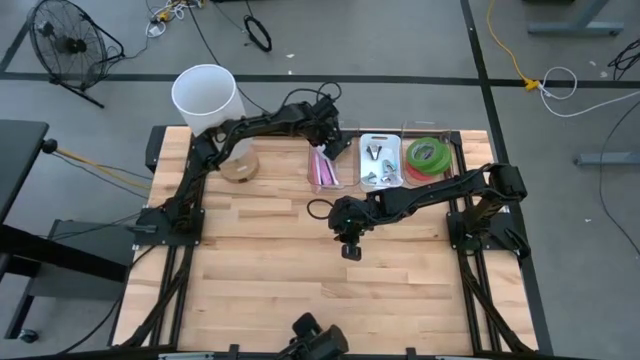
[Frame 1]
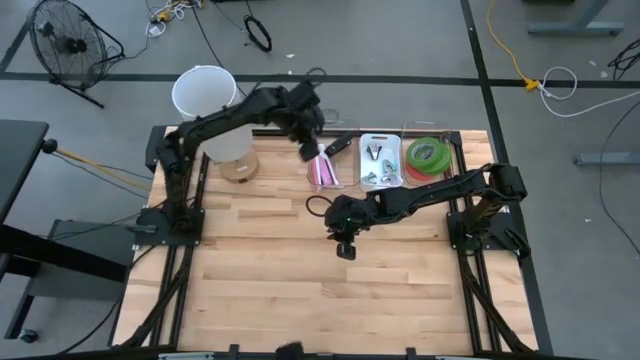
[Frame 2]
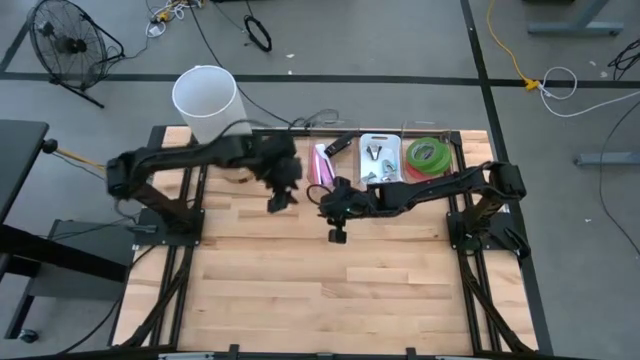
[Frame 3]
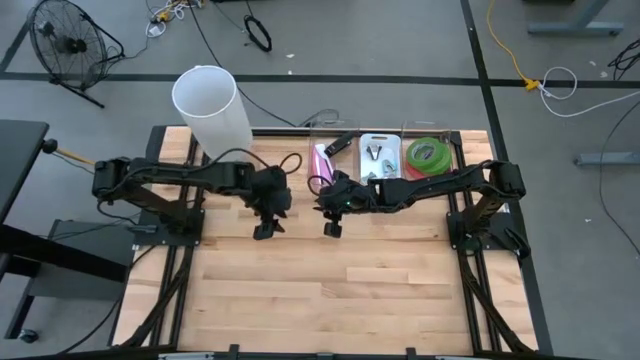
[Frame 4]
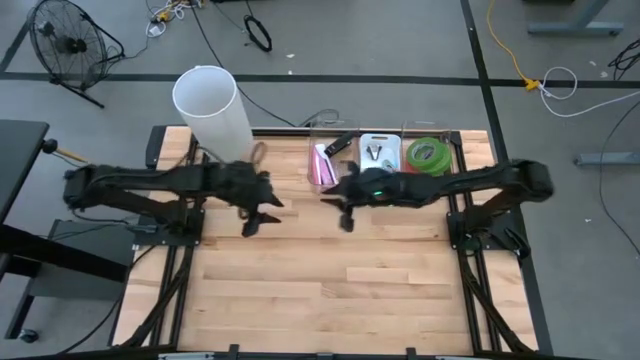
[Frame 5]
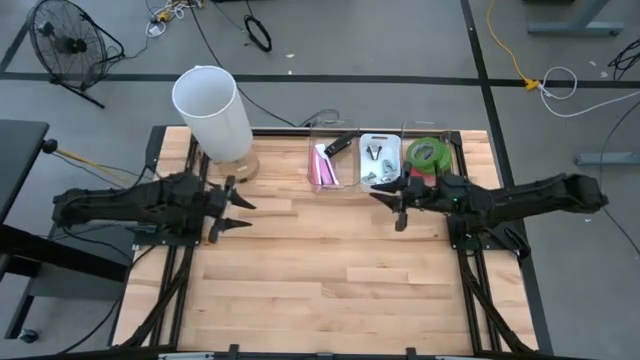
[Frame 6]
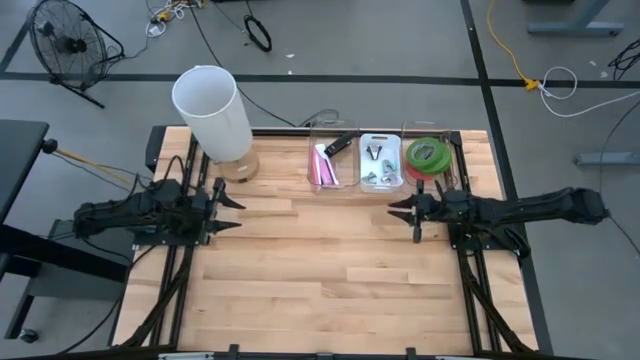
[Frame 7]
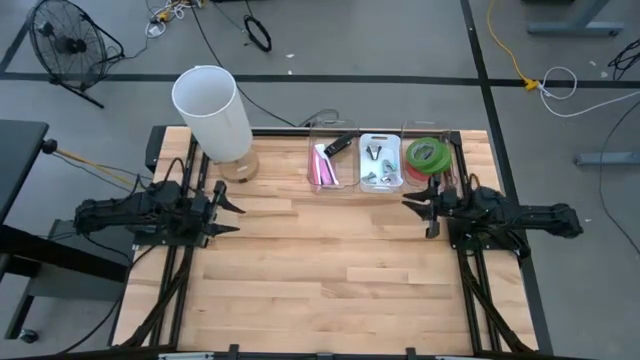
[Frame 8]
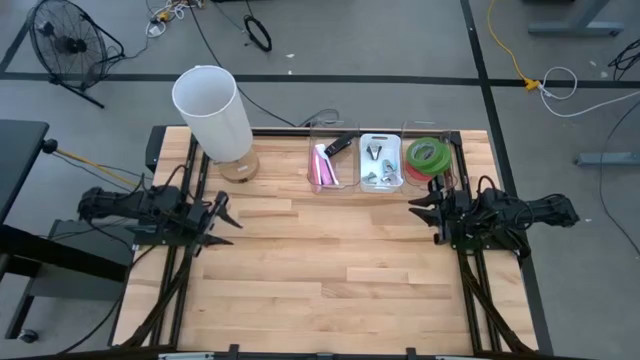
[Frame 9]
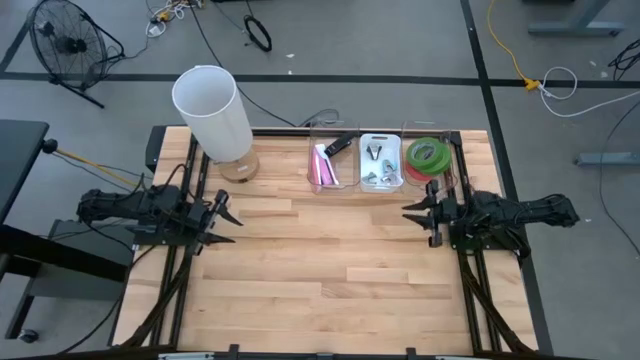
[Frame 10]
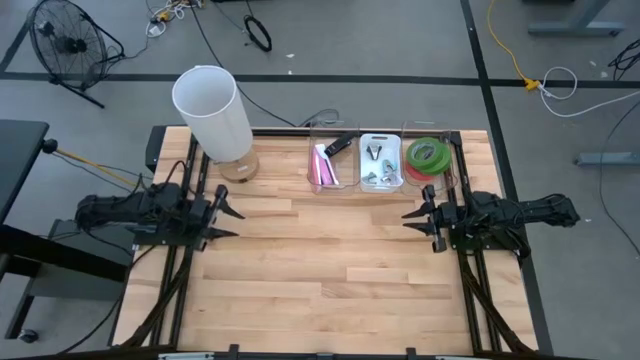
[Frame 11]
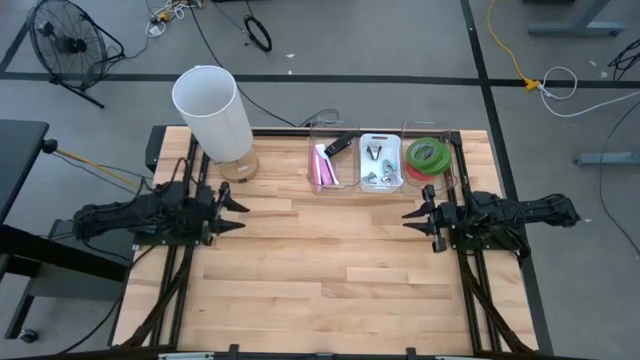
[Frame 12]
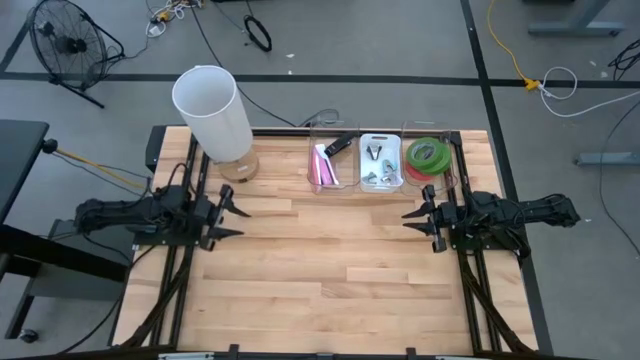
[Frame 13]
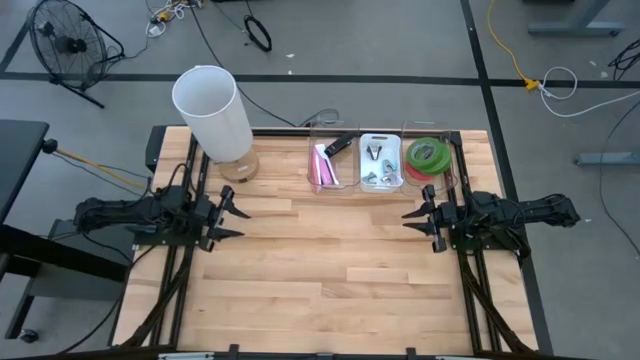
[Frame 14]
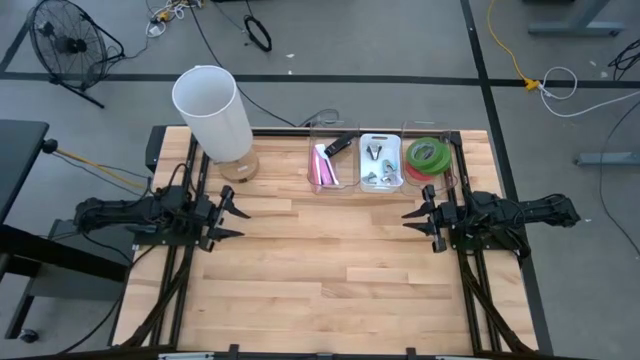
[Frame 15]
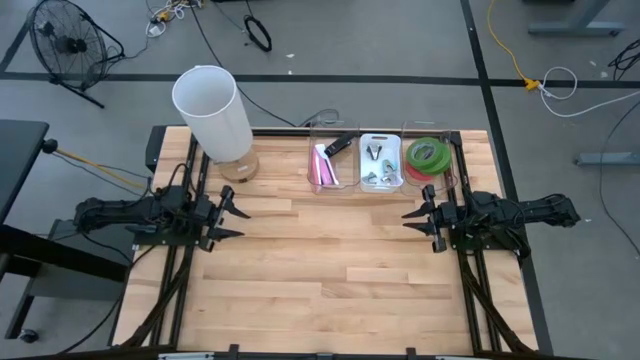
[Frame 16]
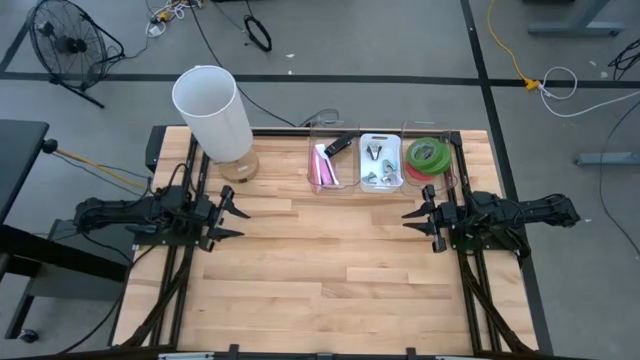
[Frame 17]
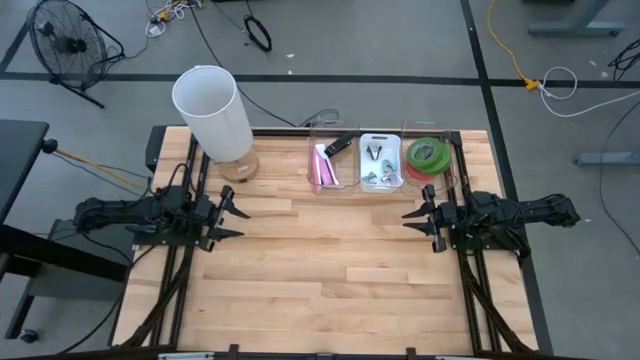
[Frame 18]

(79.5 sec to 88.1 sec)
Task: Pick and place Stapler, Stapler remover, tape
Return to Home Position

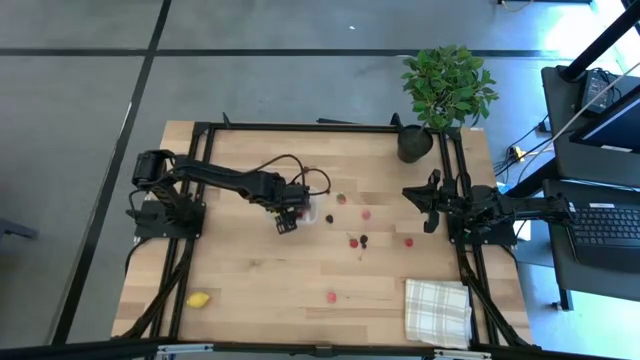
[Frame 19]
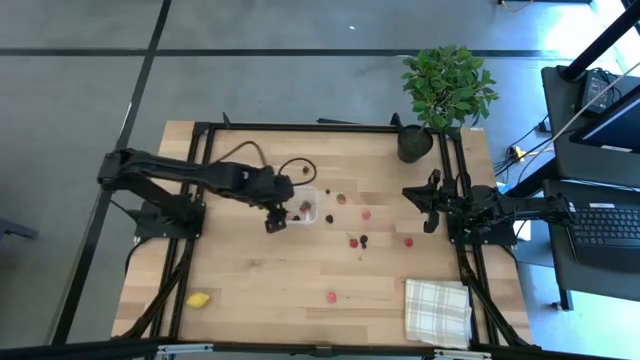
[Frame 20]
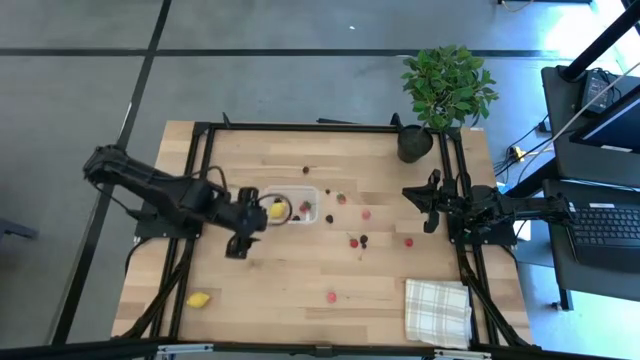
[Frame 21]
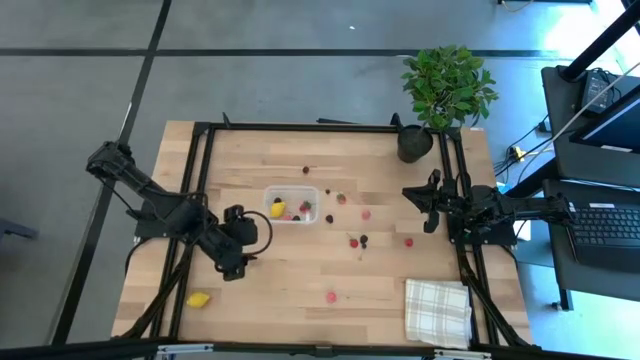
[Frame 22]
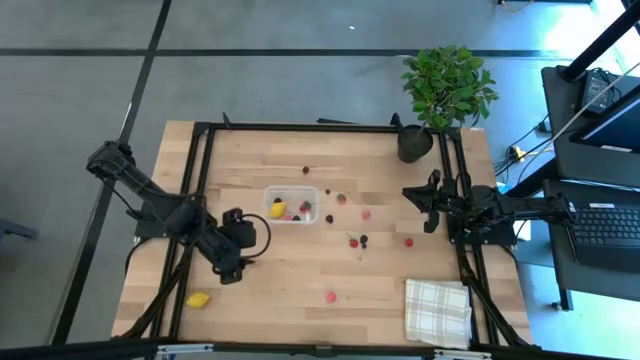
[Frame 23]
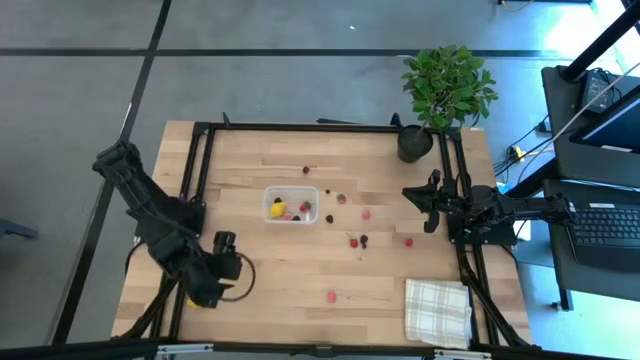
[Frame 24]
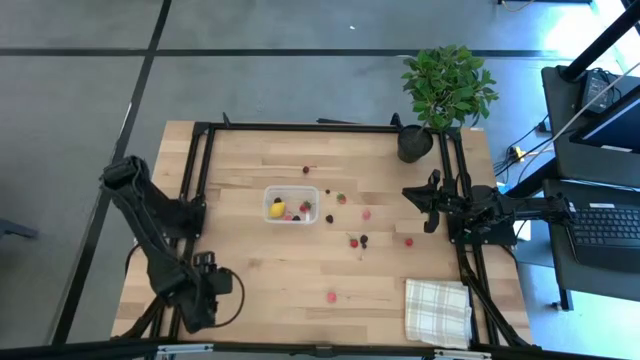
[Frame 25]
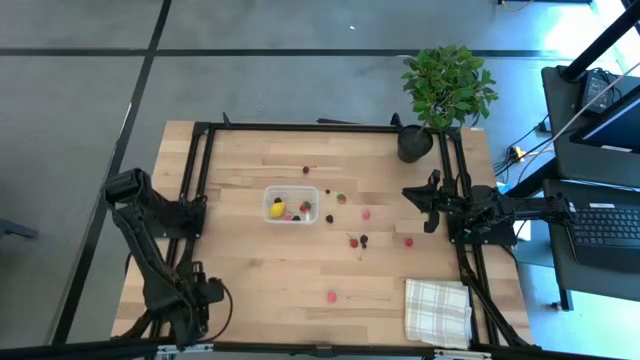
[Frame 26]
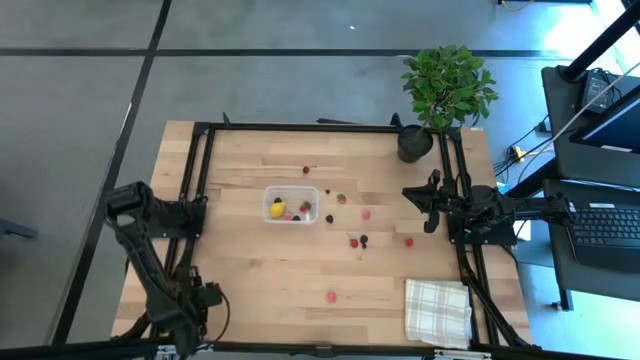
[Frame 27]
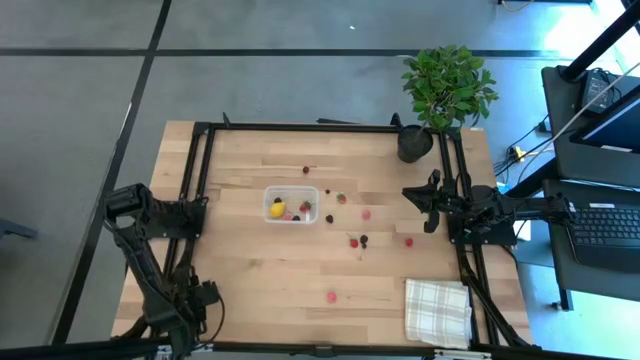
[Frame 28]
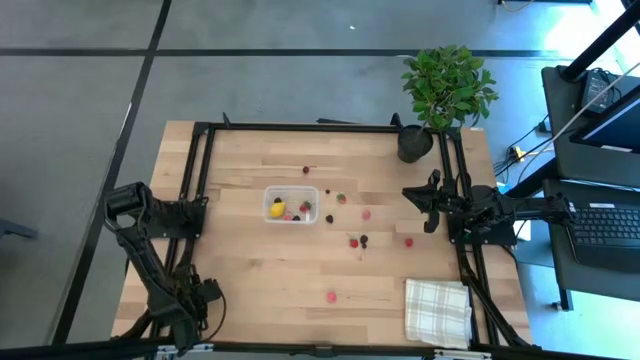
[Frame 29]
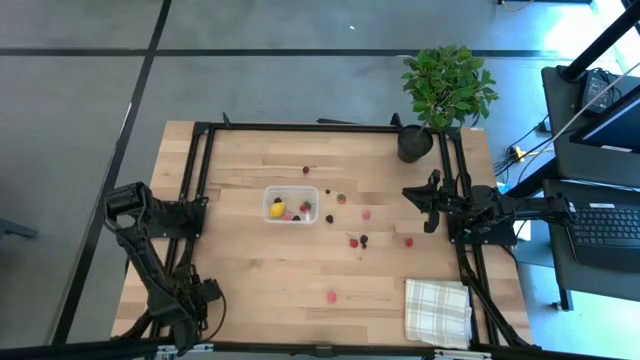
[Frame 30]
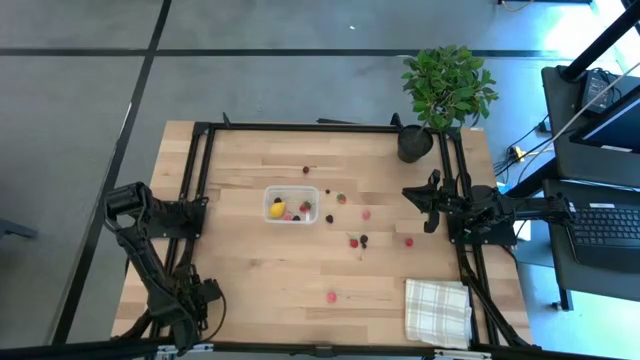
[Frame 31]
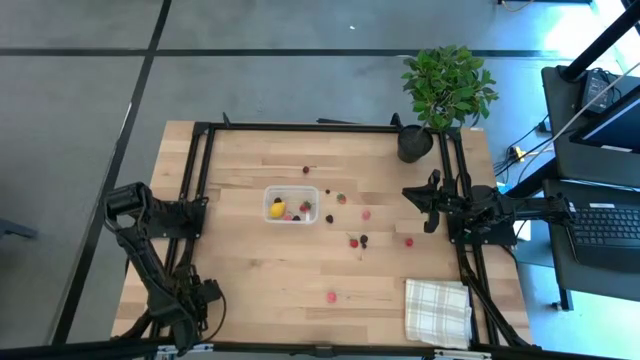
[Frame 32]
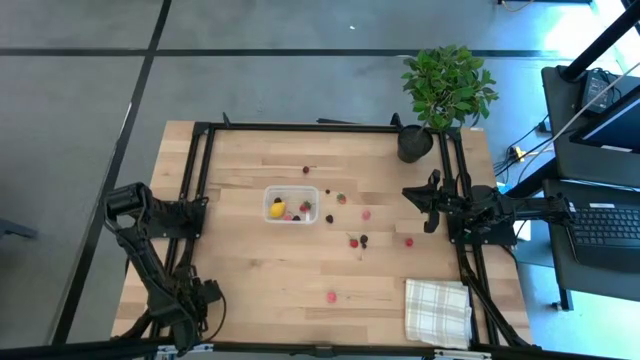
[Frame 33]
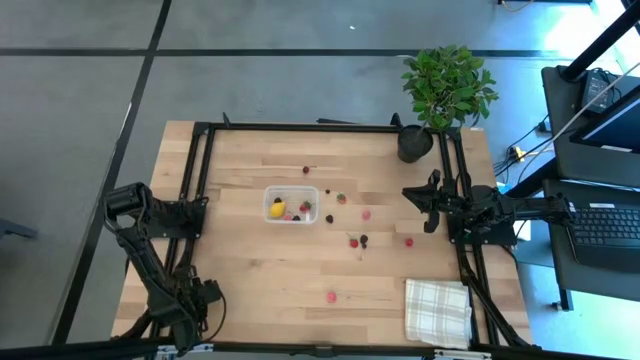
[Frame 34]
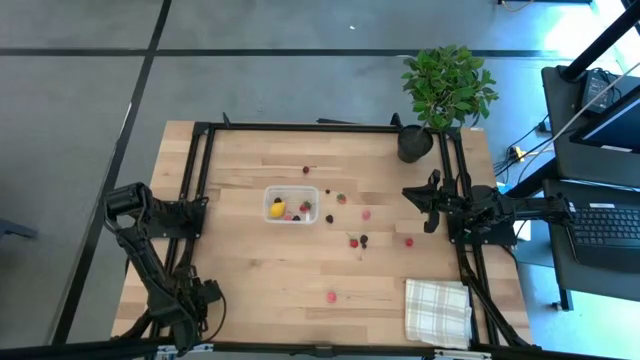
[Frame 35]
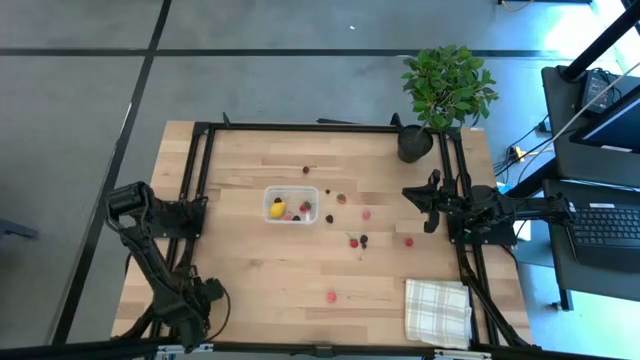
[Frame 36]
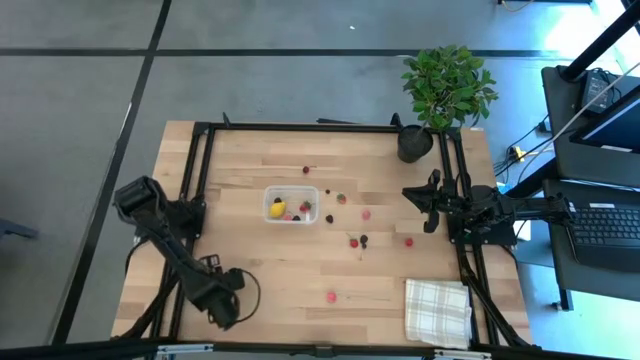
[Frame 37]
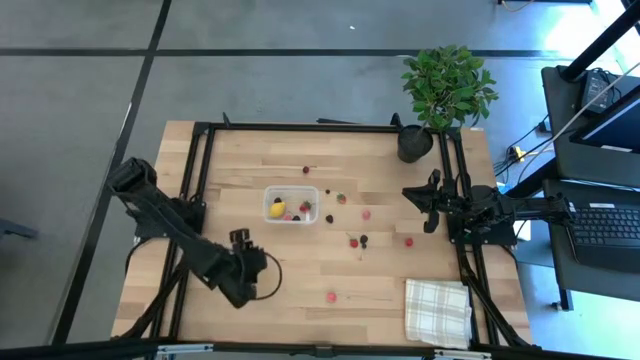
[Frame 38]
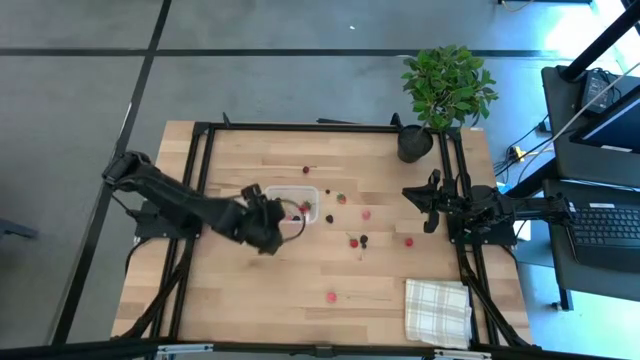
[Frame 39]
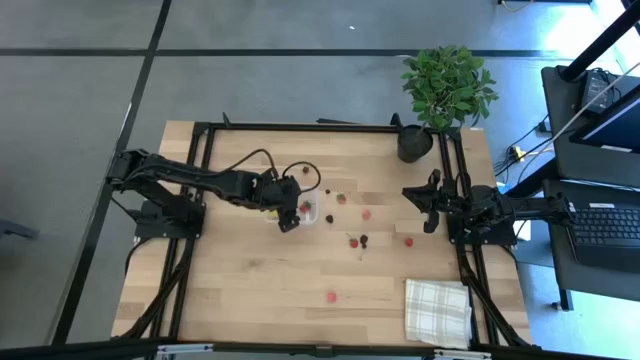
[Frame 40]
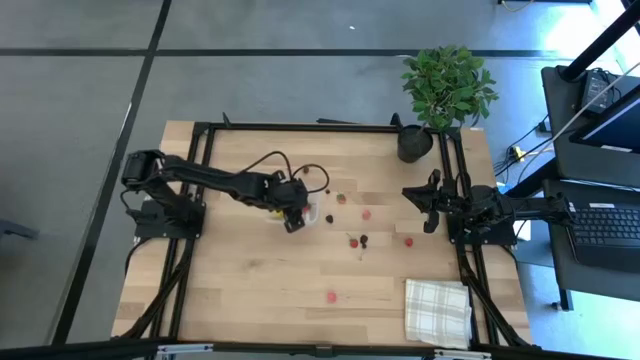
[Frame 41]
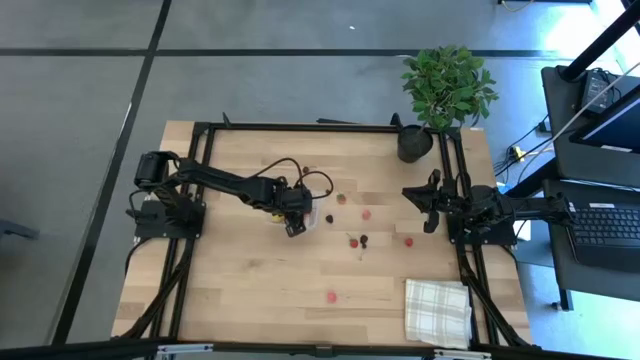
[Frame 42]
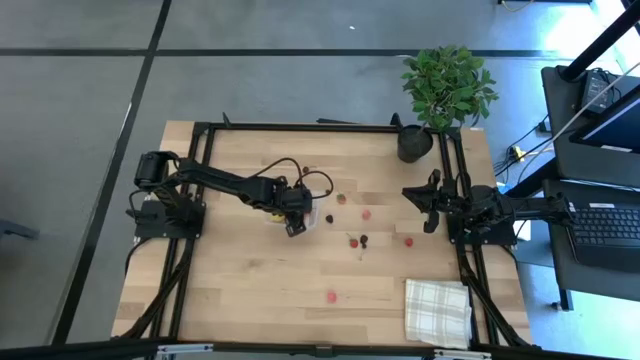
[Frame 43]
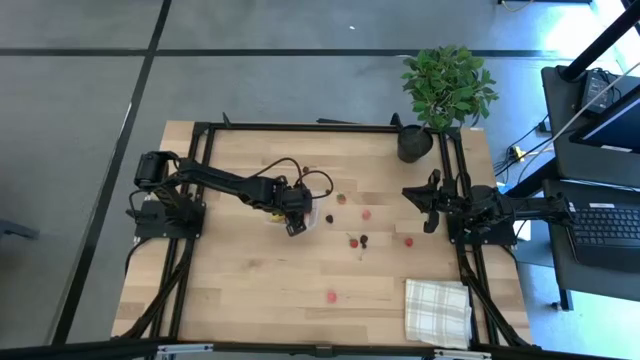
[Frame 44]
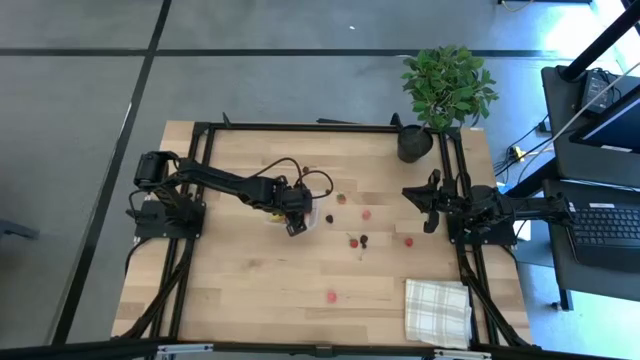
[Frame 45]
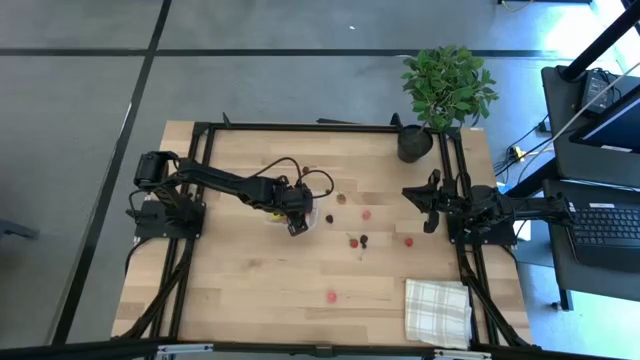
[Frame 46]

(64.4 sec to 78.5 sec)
Task: Pick and placing Produce into tupperware
Put the lemon into the transparent bin
